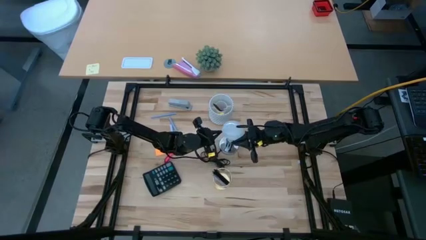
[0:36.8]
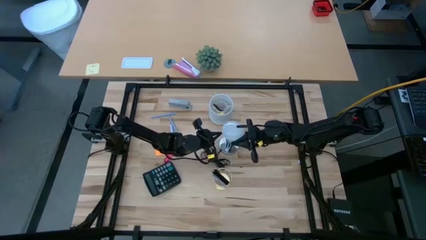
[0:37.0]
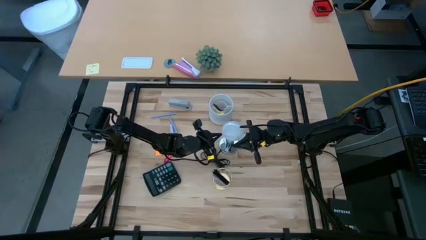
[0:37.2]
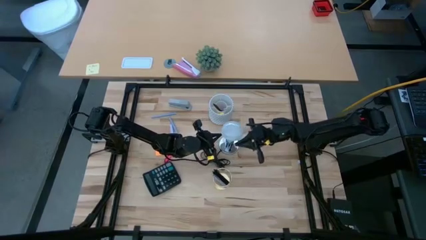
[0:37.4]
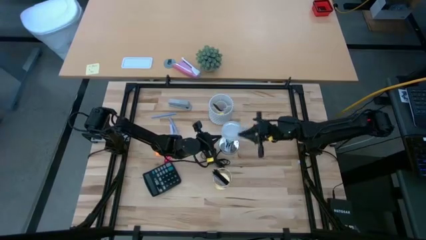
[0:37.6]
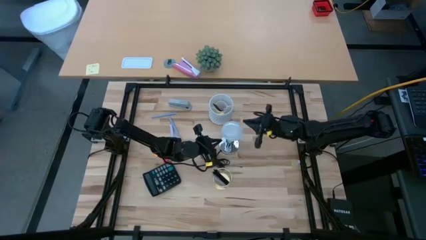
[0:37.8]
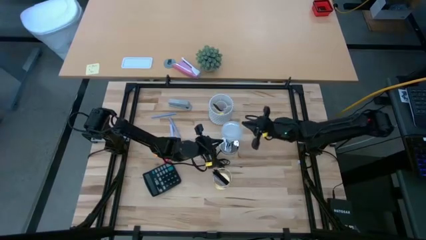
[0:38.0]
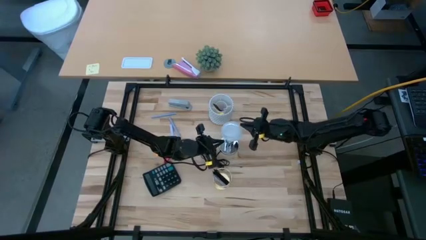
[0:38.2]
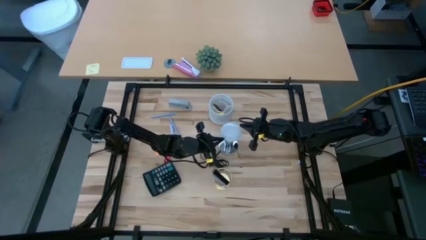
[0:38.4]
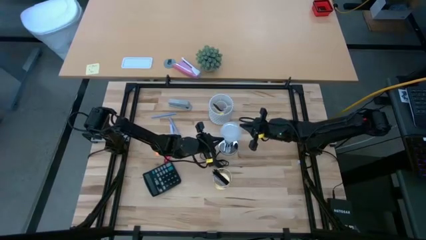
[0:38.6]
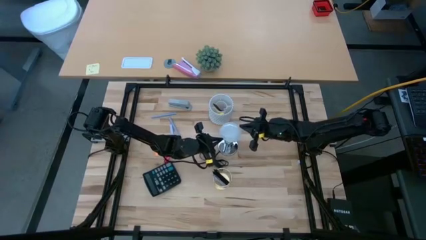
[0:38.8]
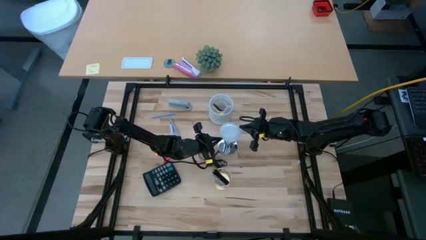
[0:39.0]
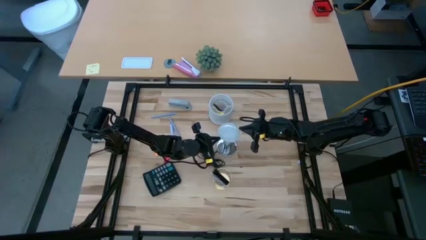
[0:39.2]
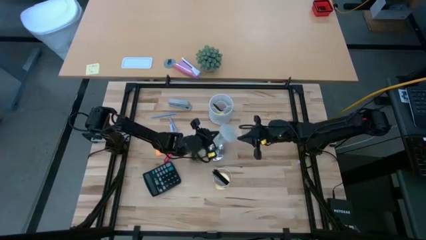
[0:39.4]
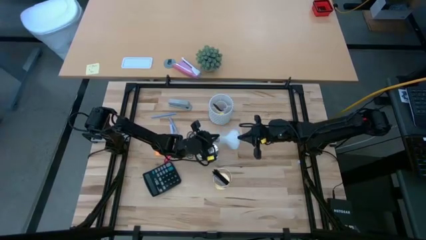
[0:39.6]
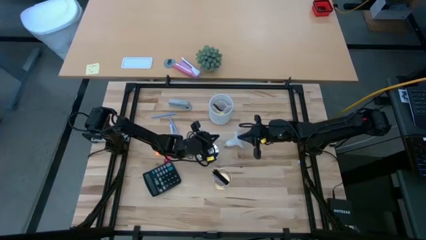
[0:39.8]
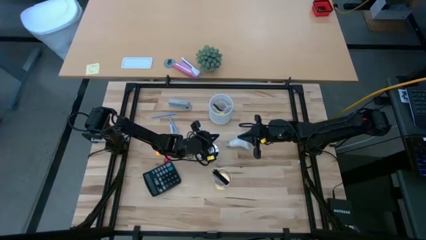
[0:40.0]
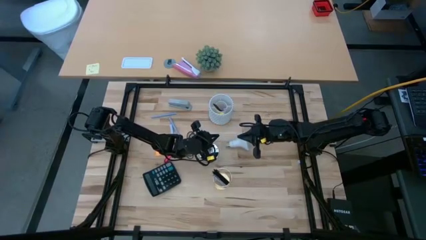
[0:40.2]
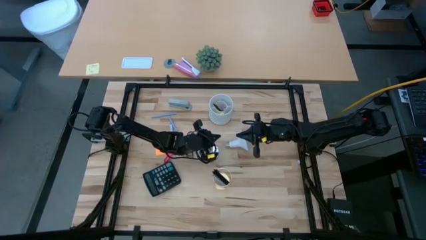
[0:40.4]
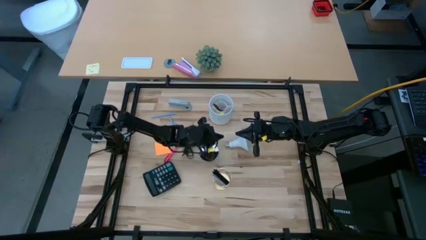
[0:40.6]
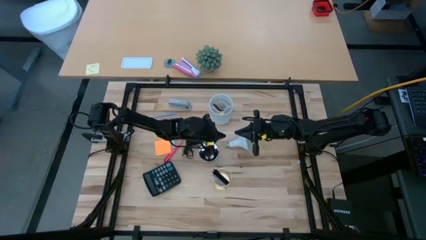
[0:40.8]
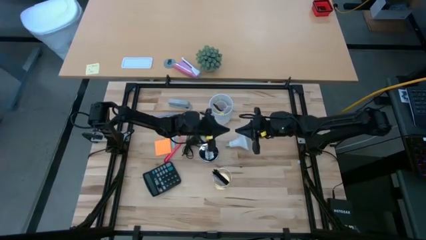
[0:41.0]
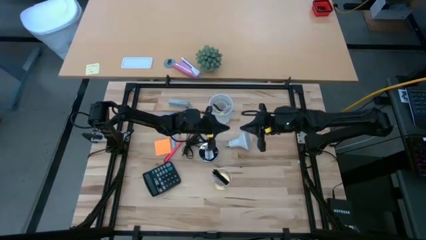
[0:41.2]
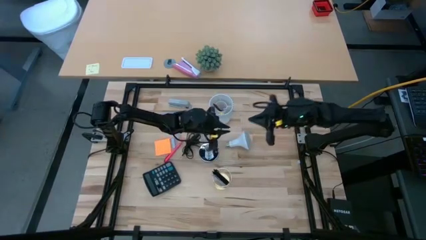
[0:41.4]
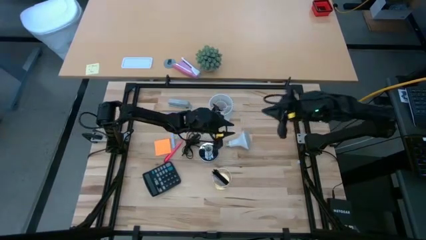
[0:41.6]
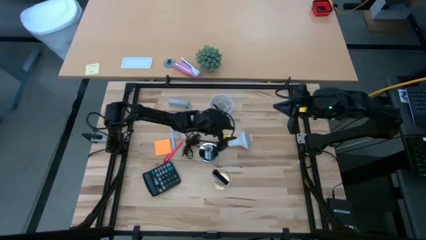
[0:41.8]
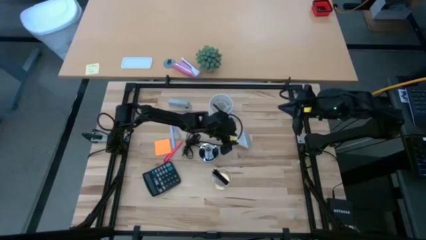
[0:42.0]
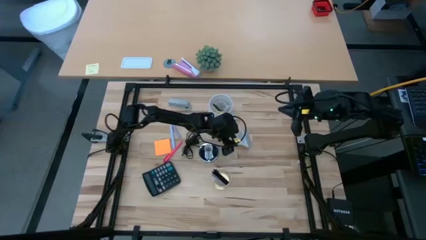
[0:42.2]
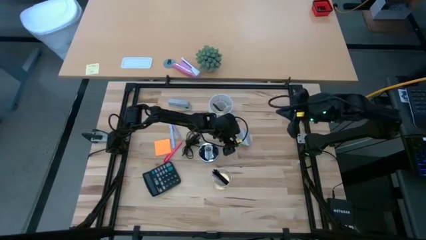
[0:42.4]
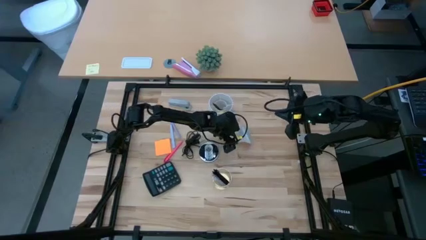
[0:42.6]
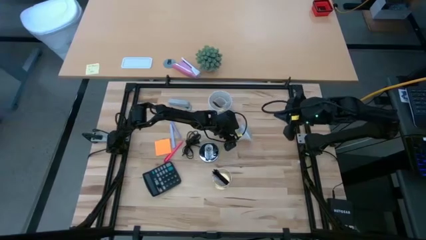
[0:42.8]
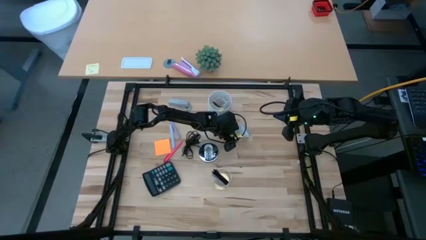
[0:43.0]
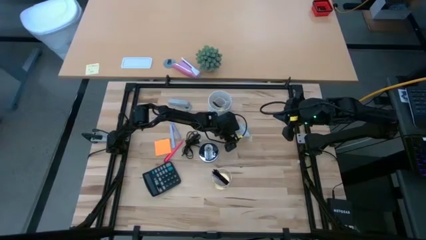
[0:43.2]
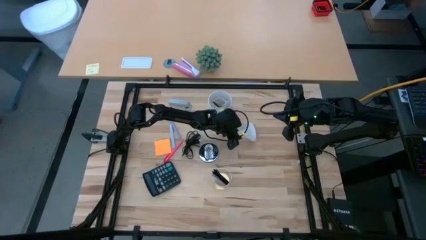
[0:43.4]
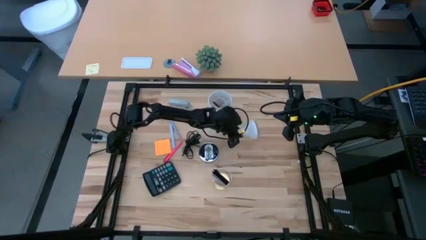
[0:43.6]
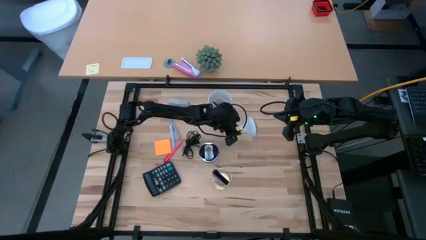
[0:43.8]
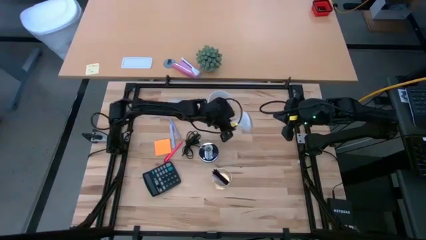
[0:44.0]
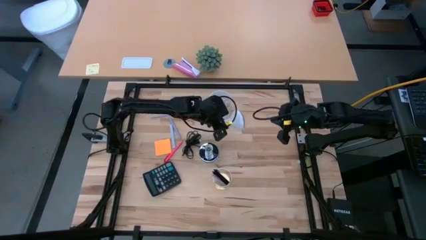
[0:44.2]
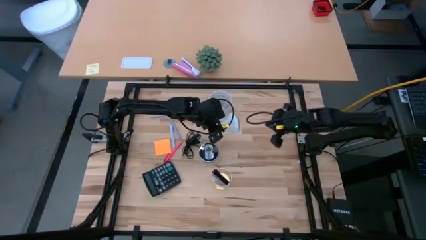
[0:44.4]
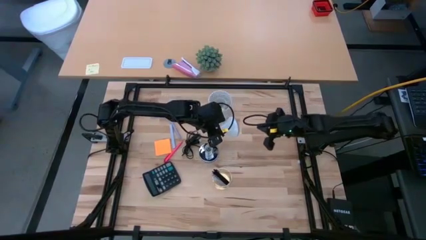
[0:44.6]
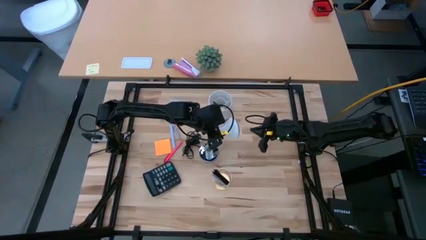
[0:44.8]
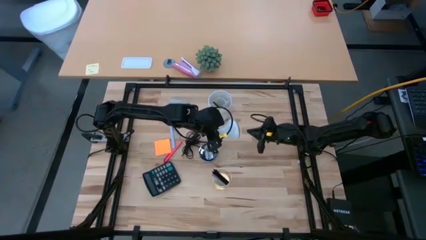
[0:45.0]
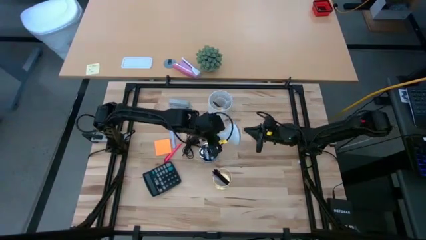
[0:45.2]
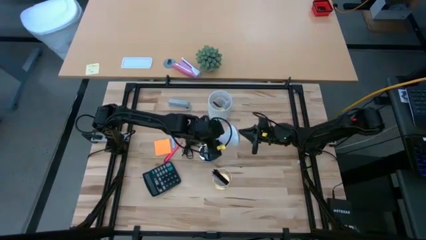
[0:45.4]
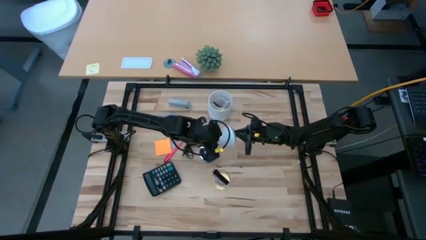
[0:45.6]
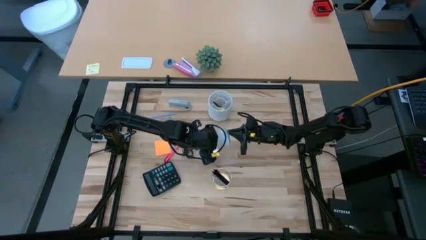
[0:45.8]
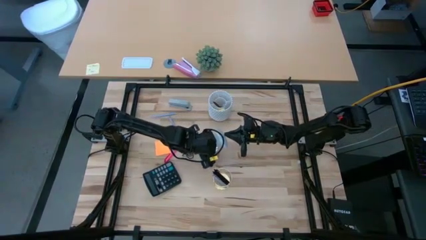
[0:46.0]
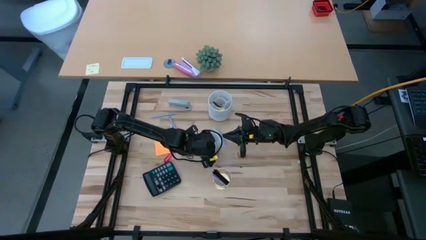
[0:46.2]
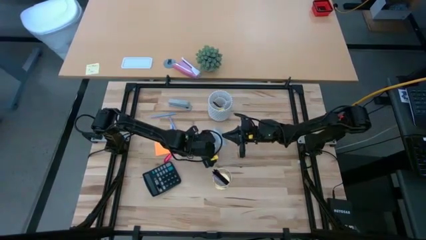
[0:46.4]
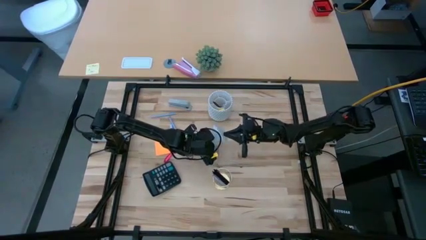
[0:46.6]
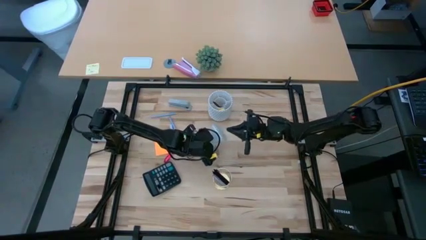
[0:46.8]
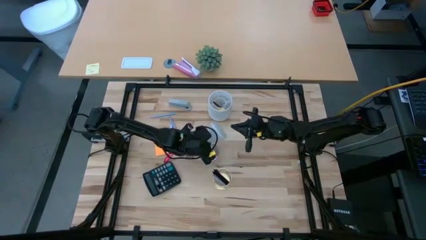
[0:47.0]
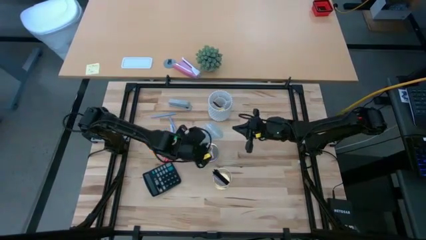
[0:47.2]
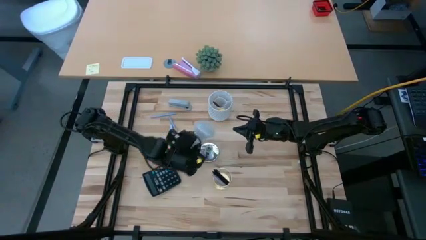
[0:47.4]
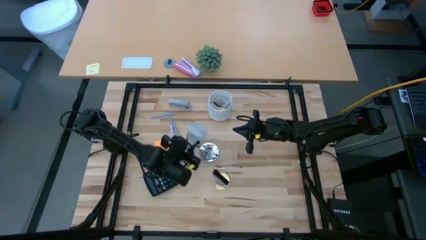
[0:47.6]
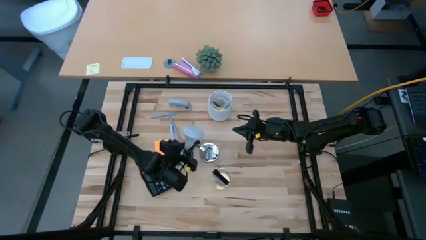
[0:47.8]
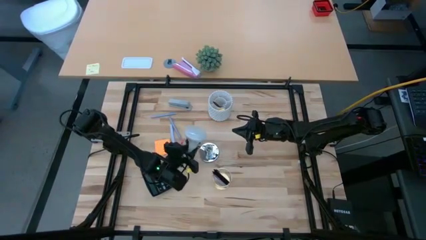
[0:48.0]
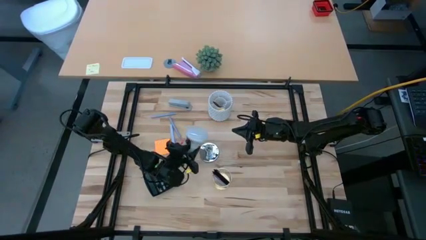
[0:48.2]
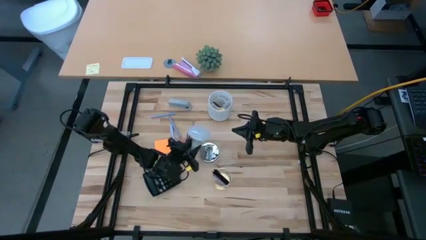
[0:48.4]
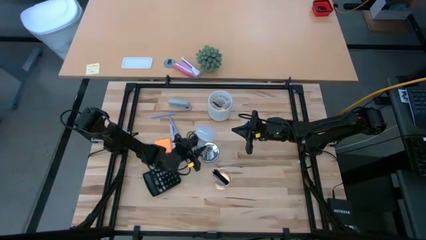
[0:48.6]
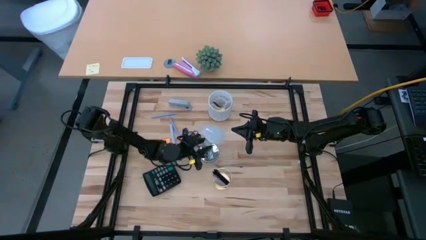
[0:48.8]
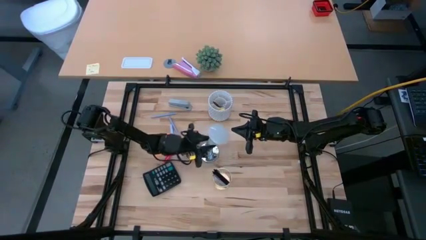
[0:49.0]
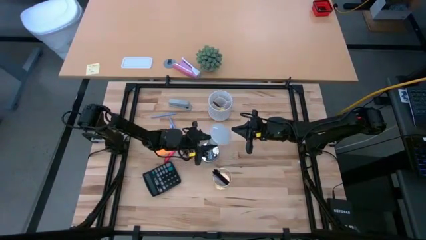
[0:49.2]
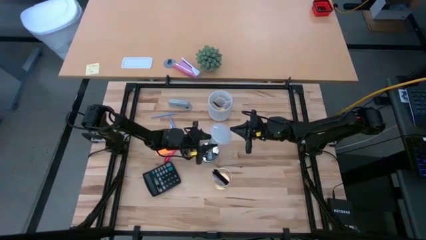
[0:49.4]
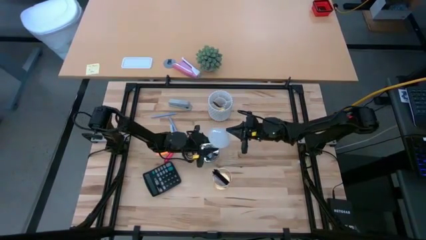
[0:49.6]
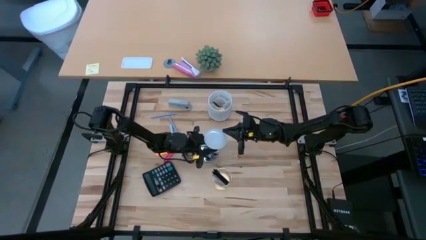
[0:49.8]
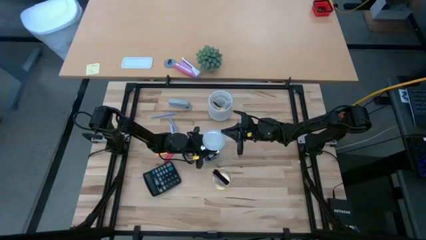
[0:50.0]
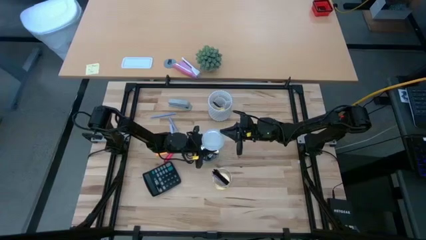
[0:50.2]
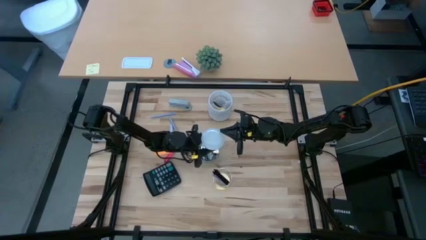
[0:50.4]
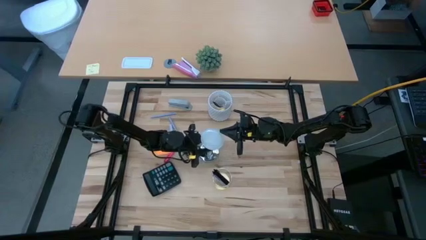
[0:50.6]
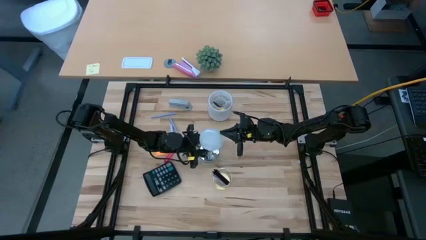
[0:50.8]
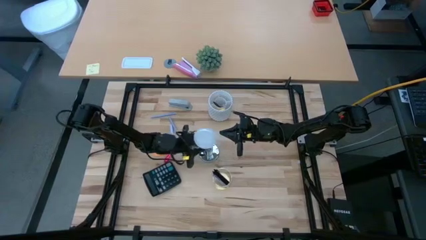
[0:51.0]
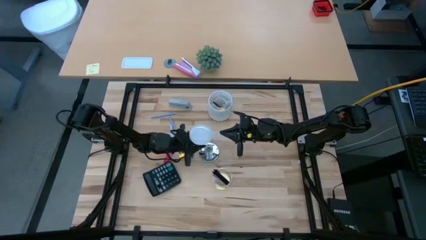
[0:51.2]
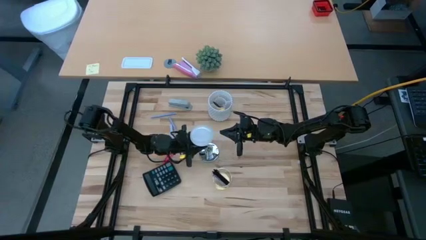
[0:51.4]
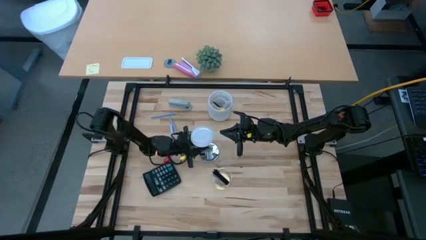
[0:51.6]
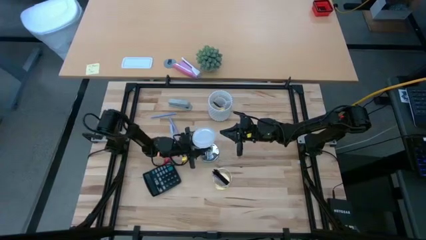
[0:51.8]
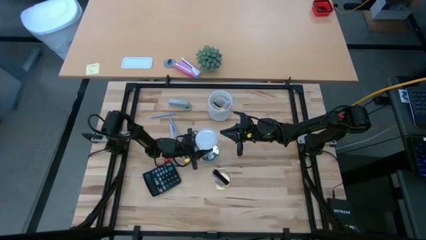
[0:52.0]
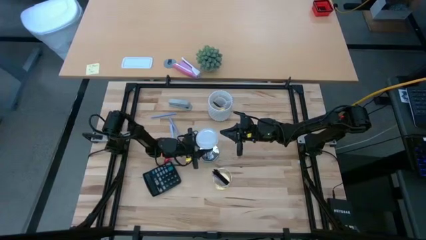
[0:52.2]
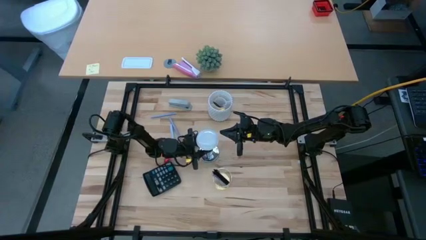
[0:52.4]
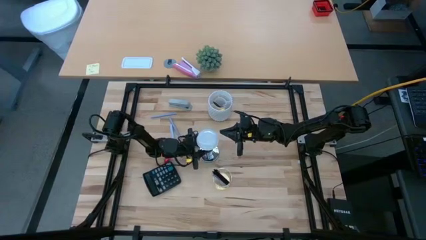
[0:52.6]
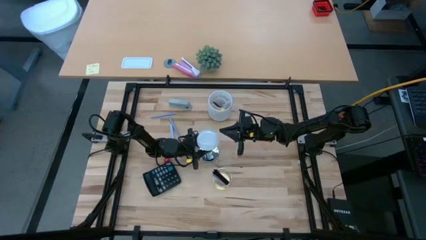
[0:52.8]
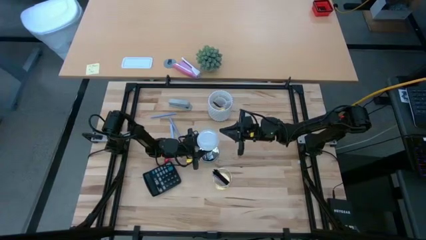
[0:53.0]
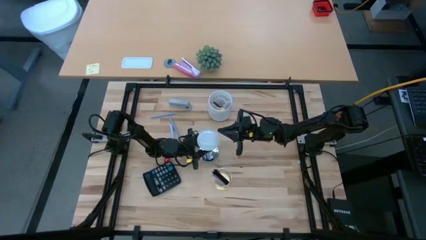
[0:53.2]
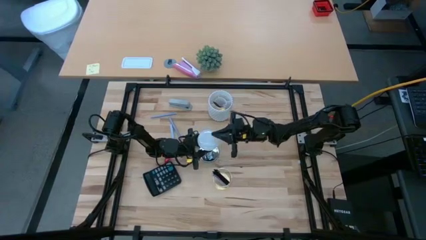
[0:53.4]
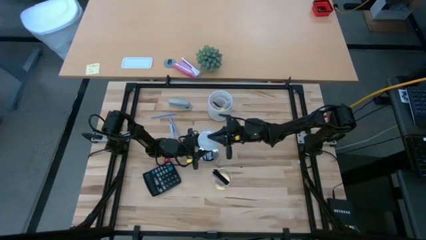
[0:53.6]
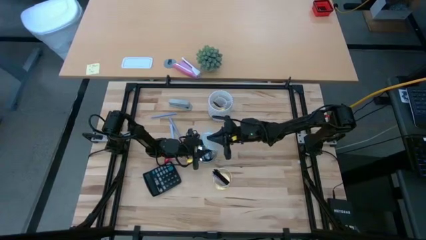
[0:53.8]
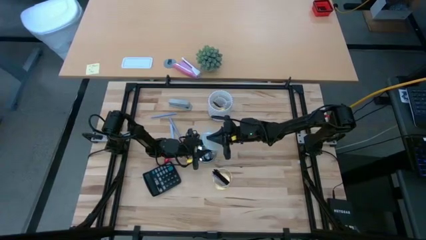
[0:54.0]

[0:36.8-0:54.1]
Task: Screw lightbulb
Insert the lightbulb into the lamp
